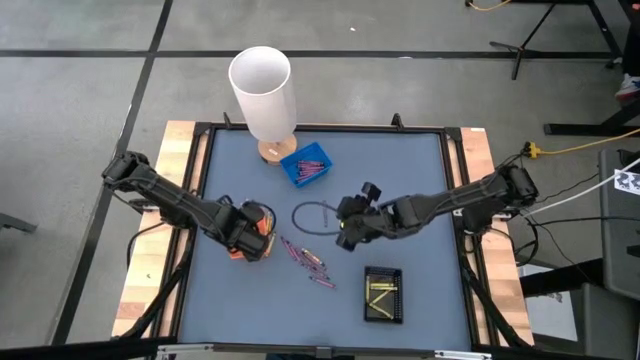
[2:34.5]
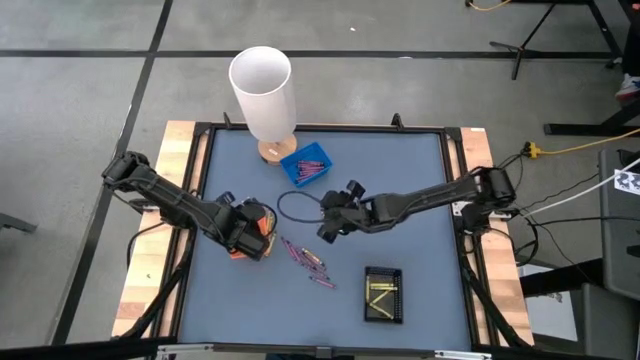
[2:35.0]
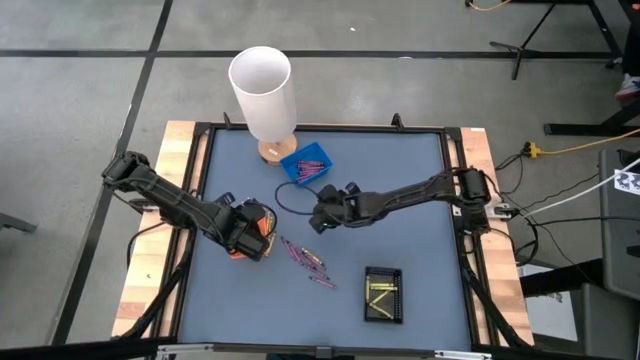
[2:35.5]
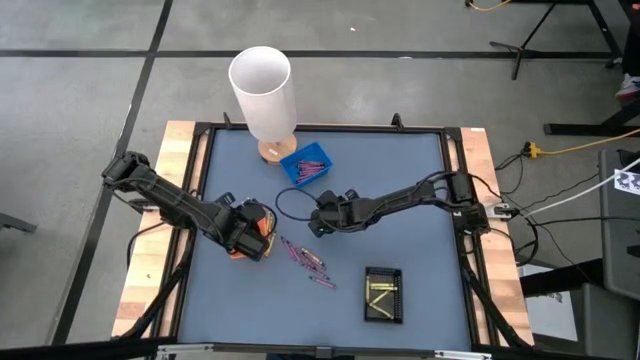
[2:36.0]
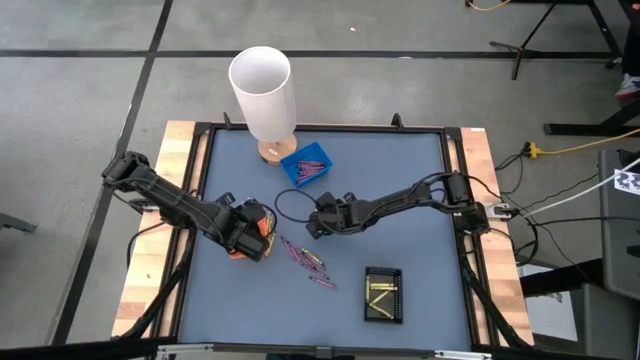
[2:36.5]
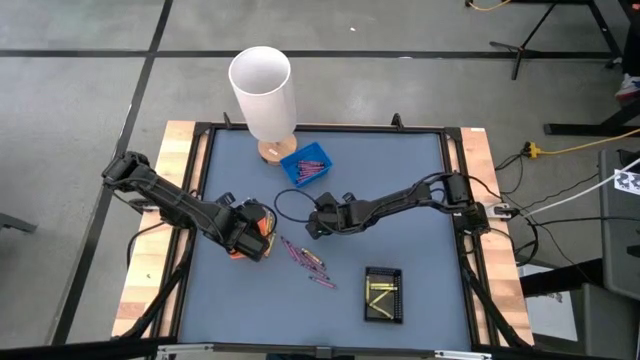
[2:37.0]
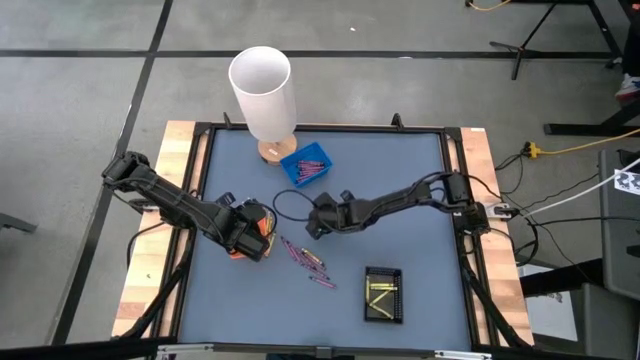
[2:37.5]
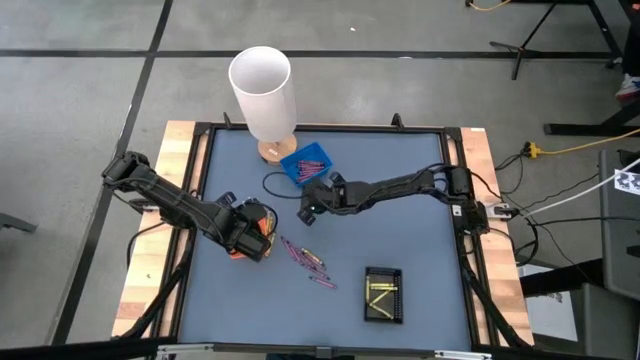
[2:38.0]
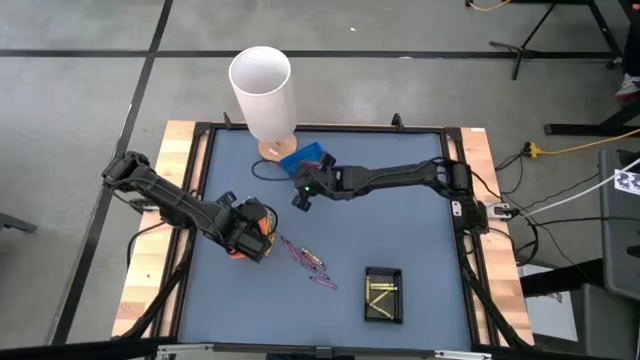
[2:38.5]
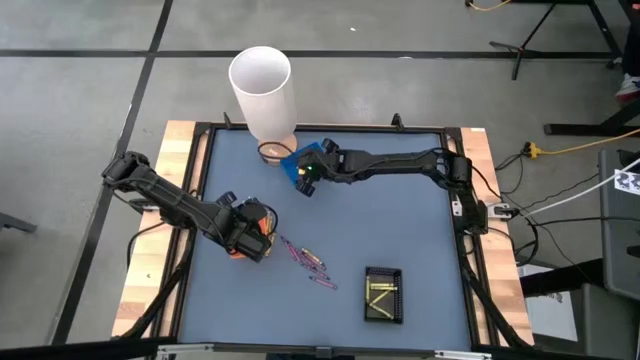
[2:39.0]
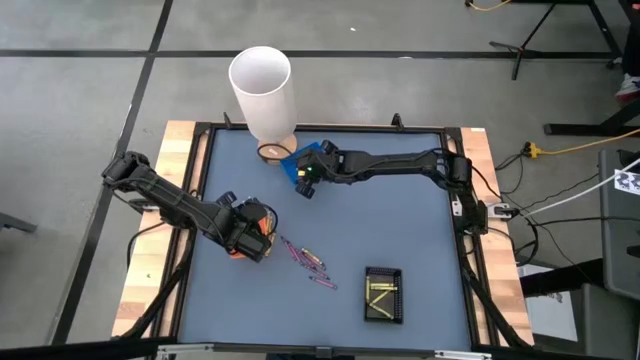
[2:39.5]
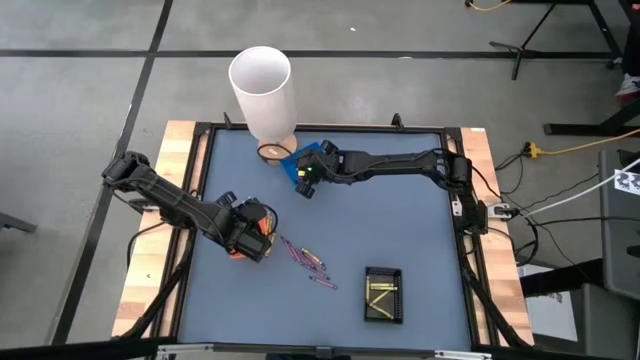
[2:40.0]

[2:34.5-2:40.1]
Task: Sort crayons
Put the violet crayon into the blue bin

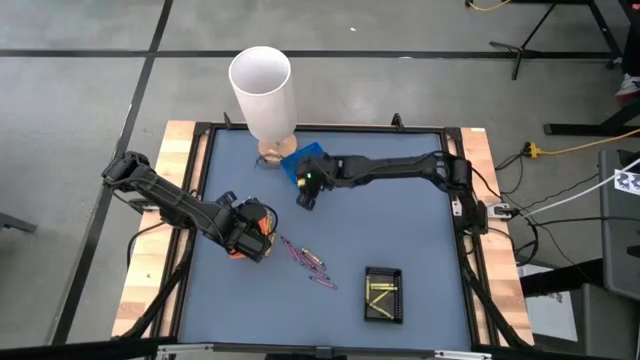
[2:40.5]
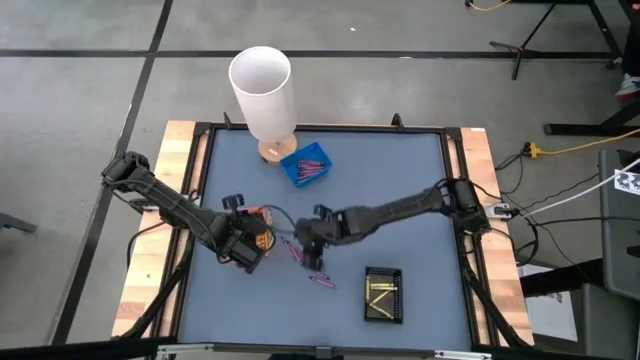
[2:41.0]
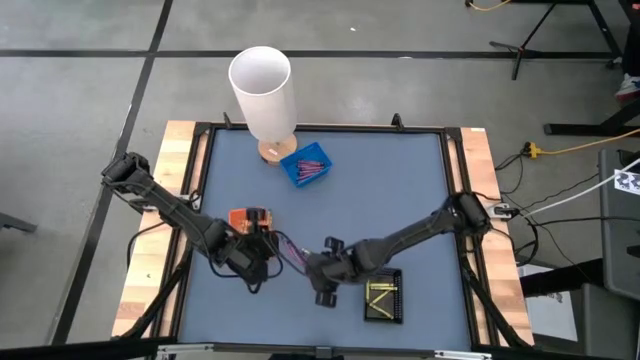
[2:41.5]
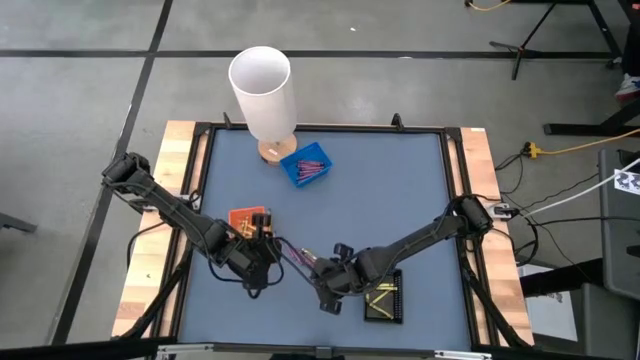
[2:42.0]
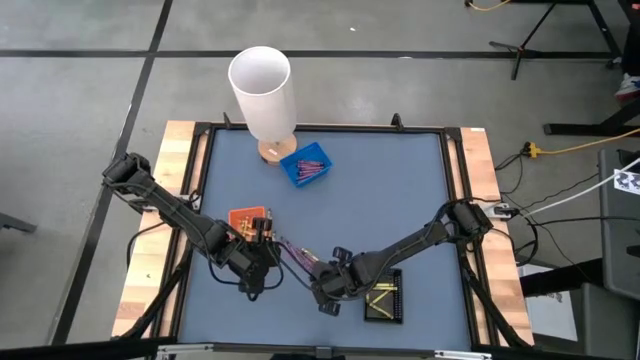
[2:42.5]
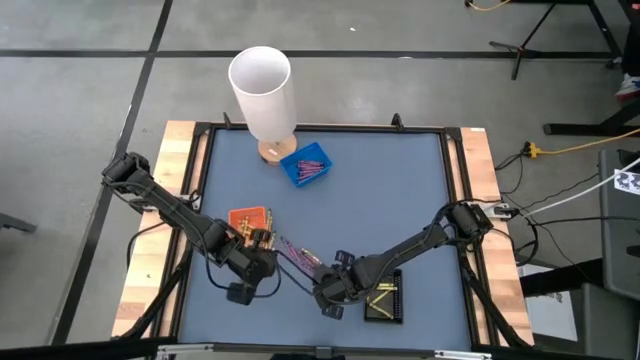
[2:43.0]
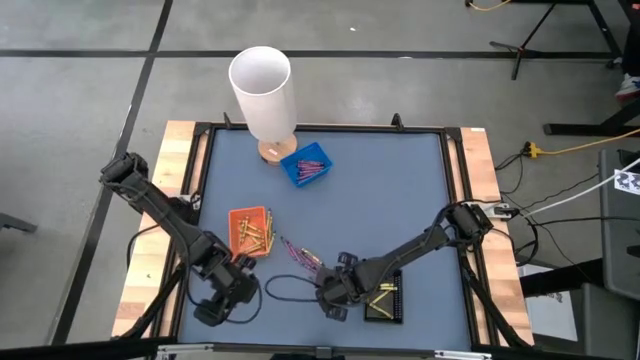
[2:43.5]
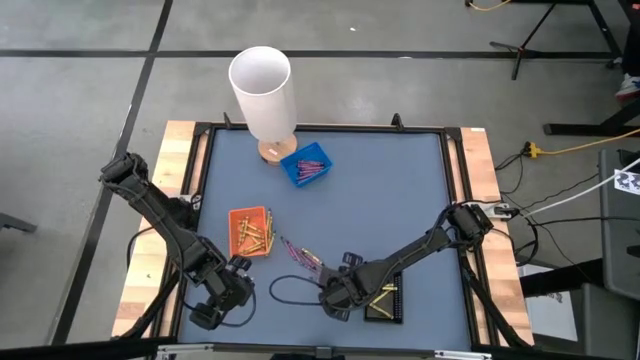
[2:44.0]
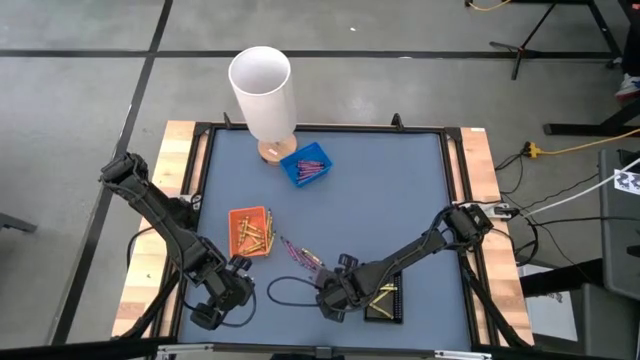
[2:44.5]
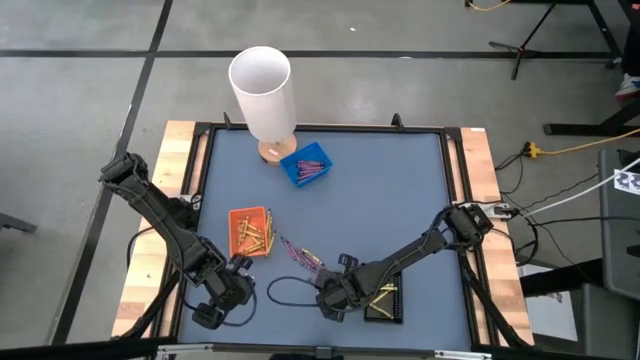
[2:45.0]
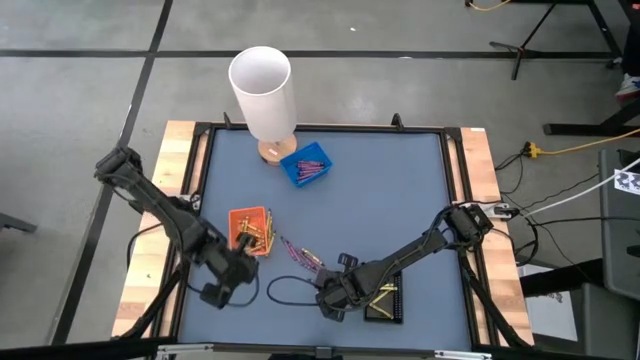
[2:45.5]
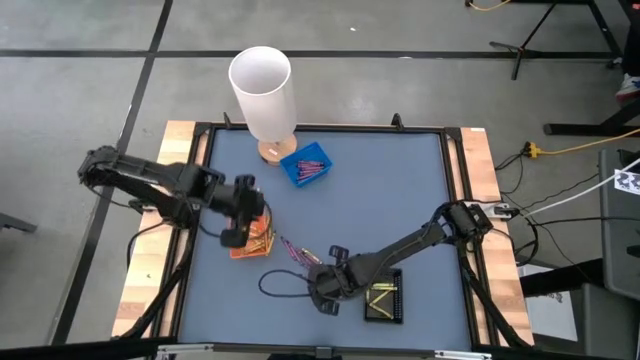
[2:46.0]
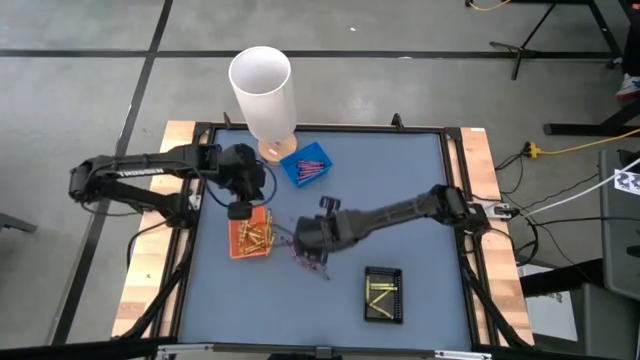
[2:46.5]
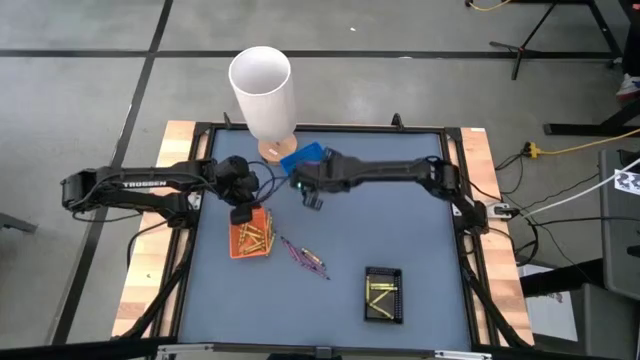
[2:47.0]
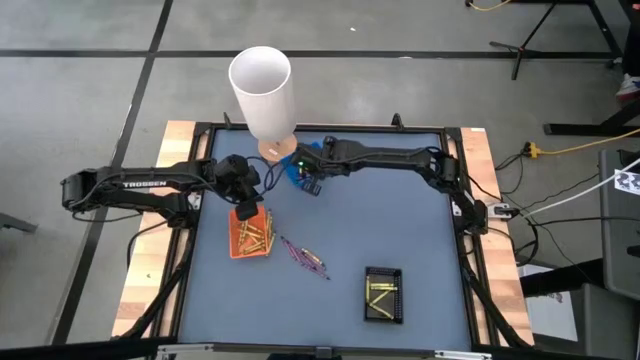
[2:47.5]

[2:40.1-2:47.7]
Put the violet crayon into the blue bin

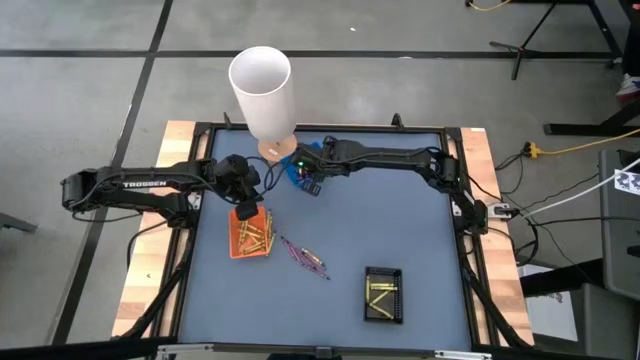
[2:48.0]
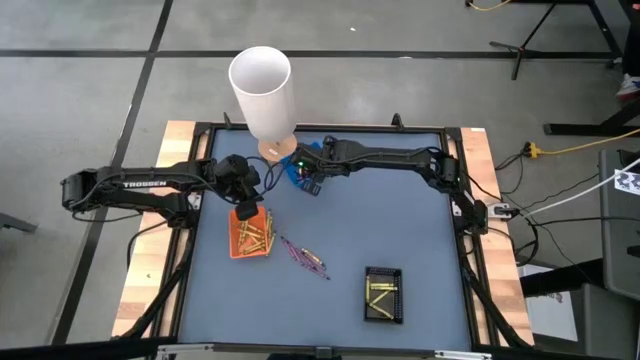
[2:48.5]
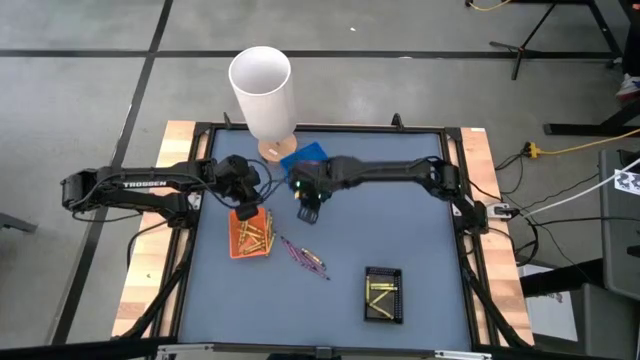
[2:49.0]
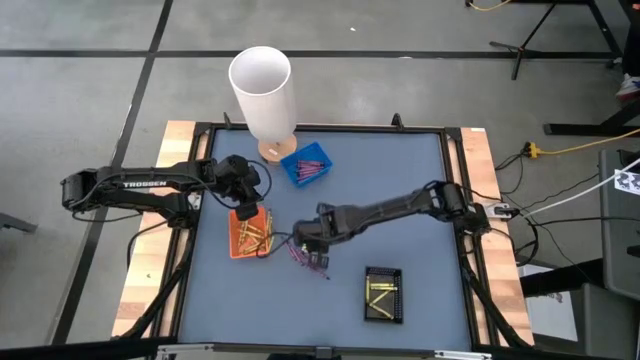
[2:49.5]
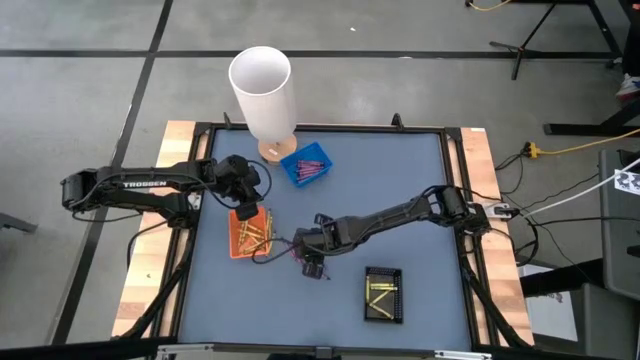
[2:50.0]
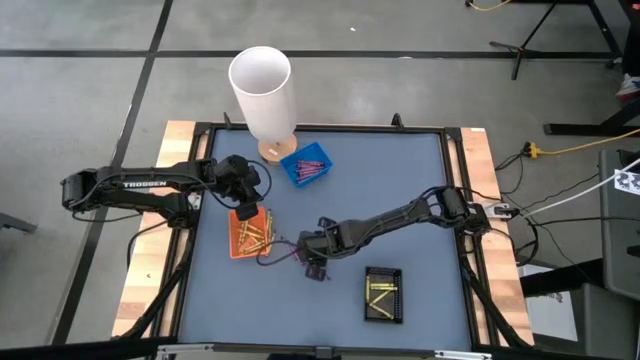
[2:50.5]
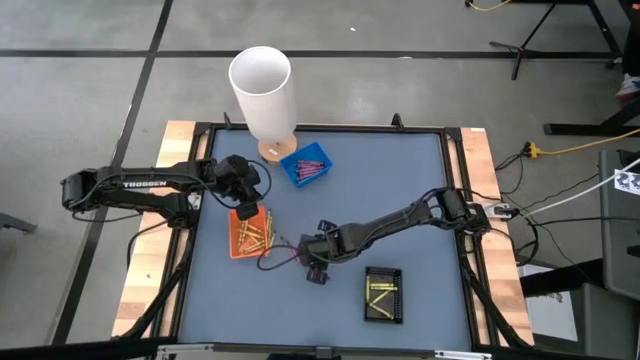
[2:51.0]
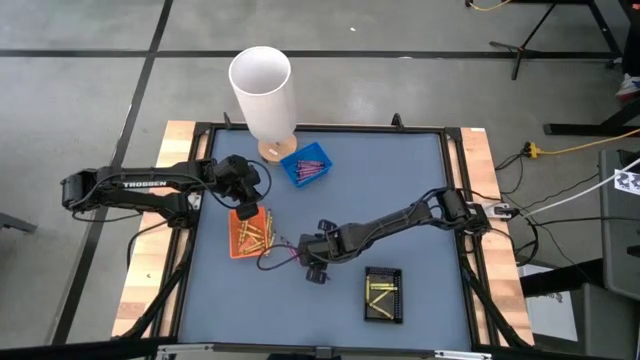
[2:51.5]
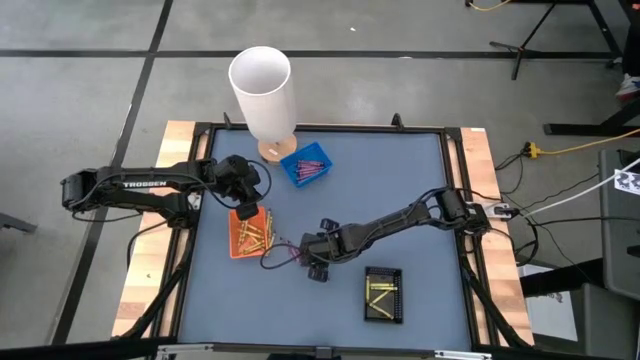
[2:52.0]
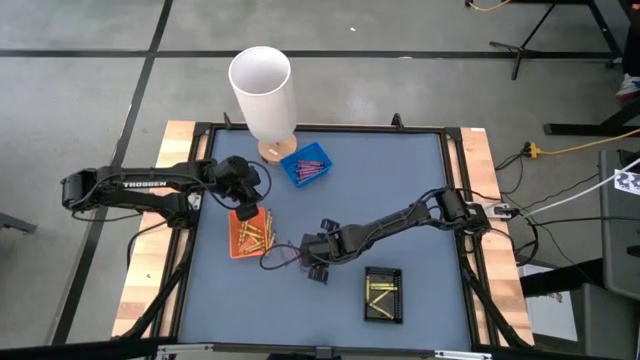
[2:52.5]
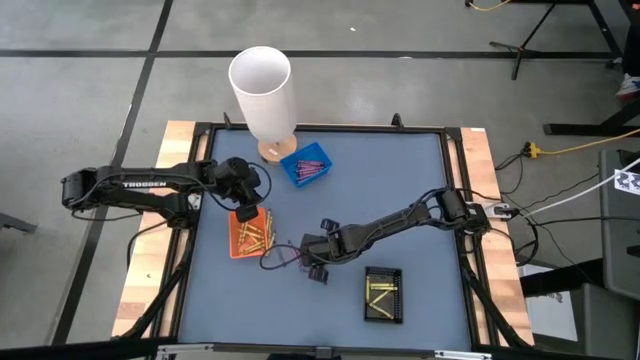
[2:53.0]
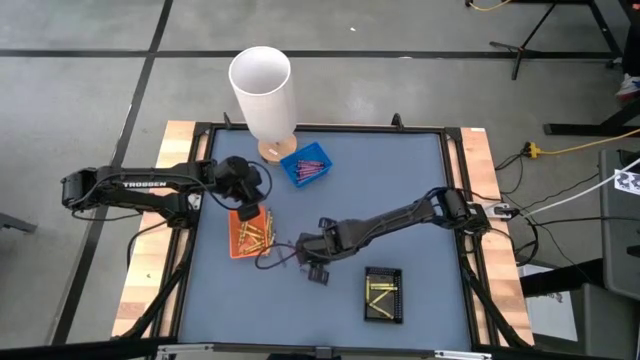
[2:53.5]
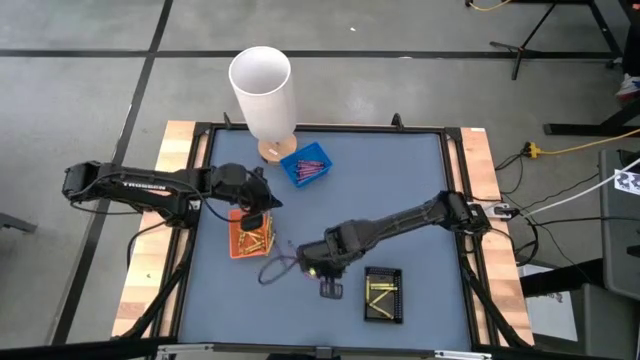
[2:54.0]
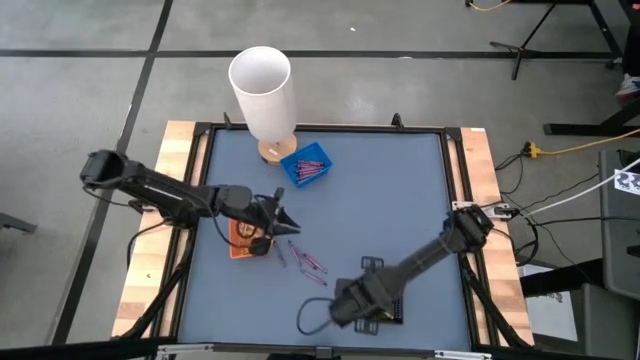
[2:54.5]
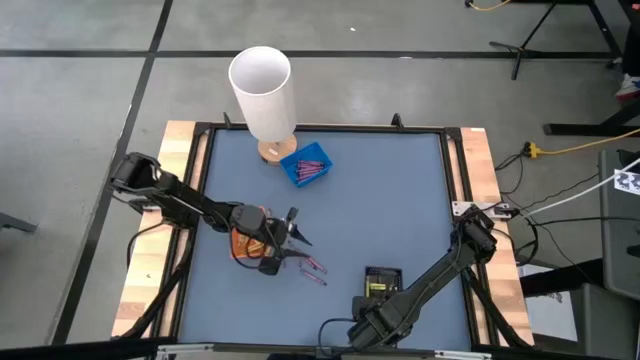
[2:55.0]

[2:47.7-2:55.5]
Put the green crayon into the black bin
